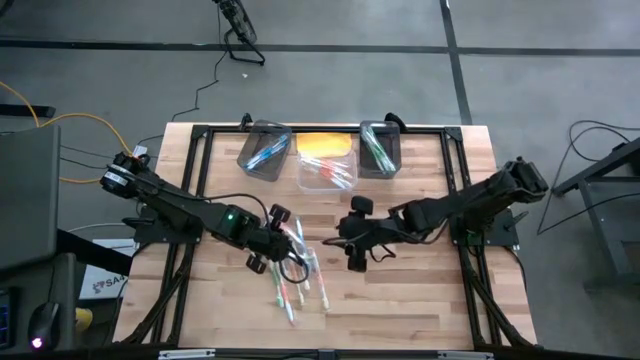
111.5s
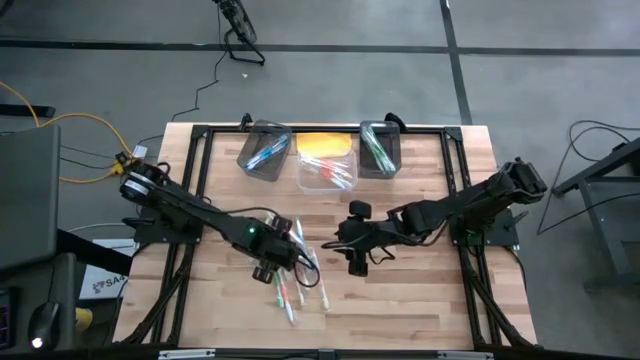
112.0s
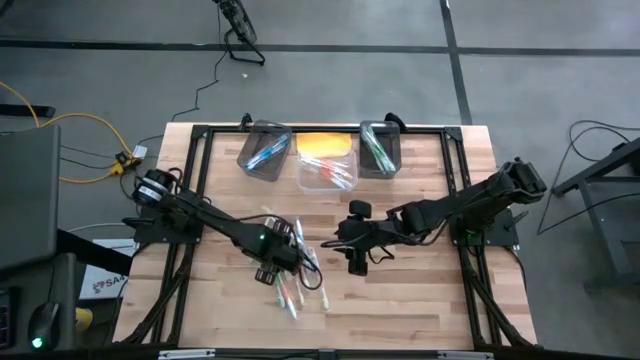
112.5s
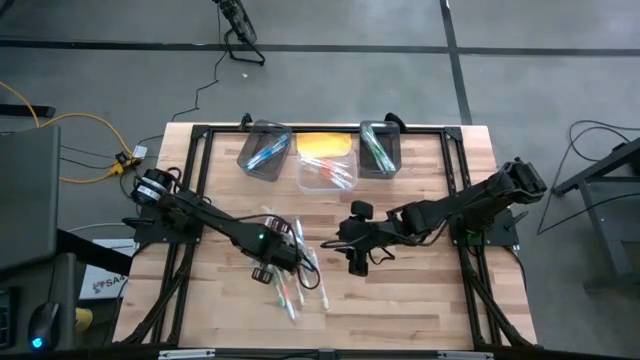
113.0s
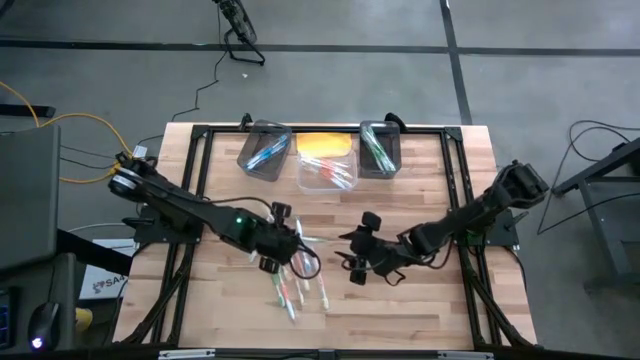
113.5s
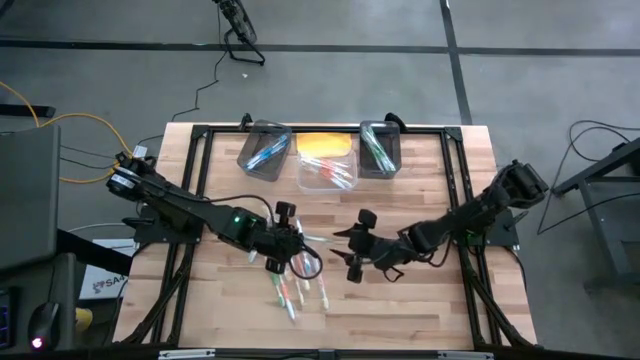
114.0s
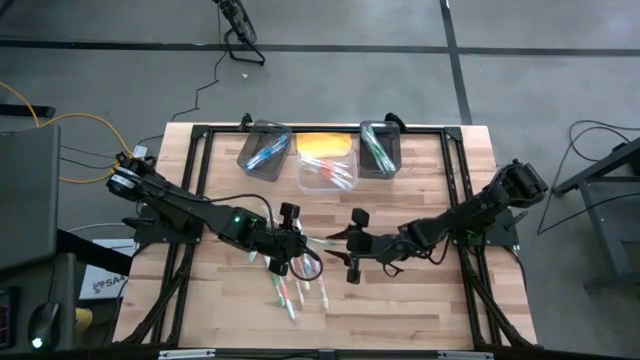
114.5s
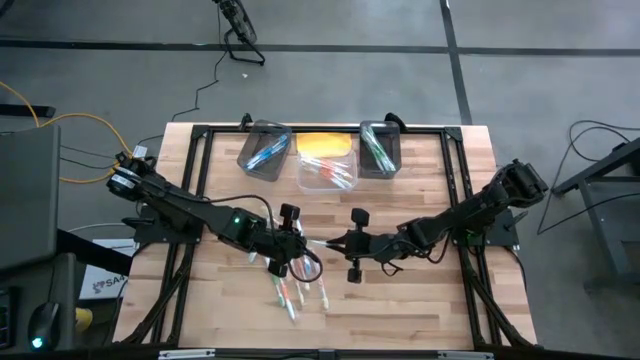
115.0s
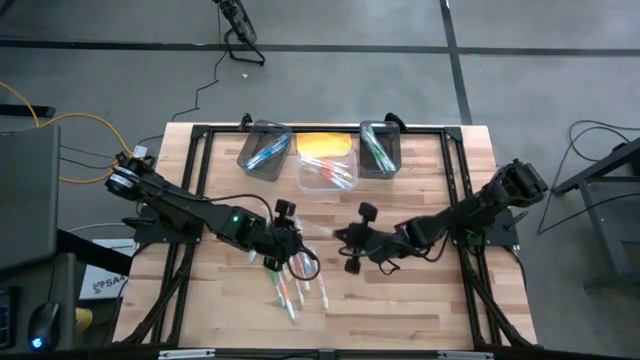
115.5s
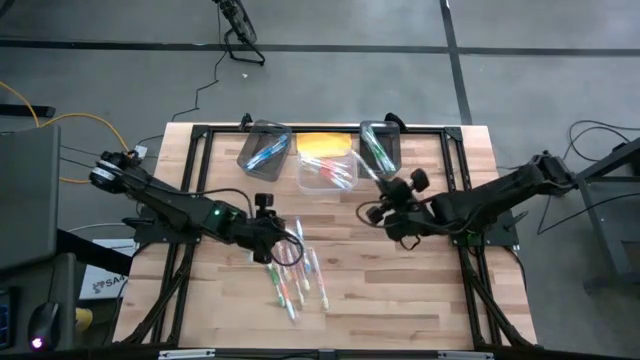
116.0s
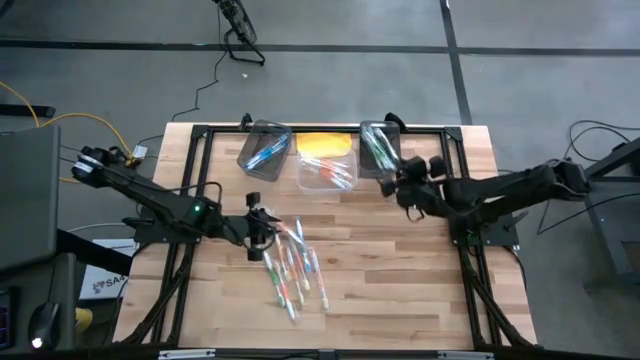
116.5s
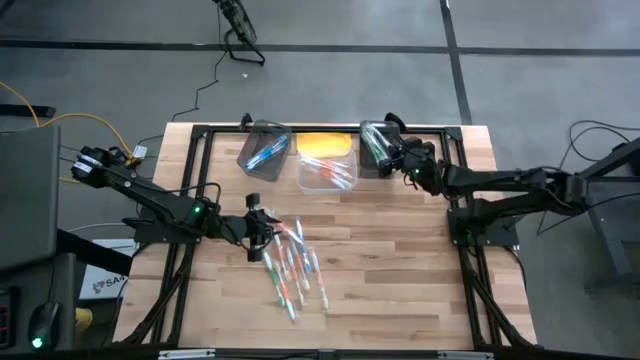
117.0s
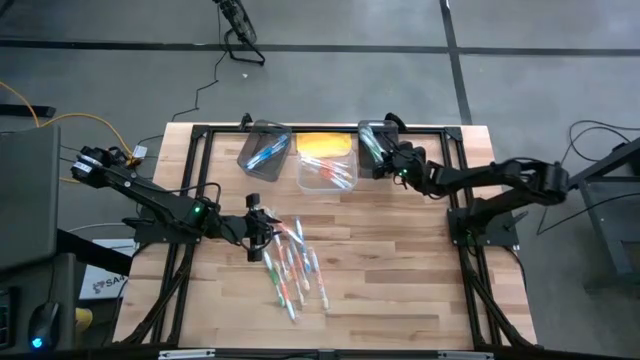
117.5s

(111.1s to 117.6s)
Task: Pick & Place Toothbrushes
Put the green toothbrush into the right black bin

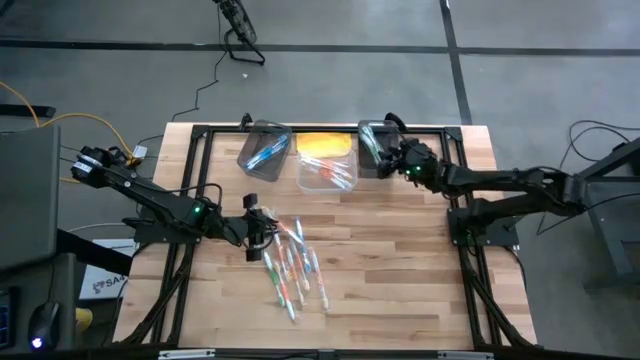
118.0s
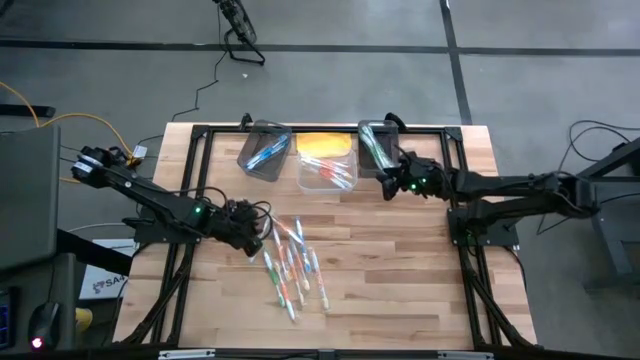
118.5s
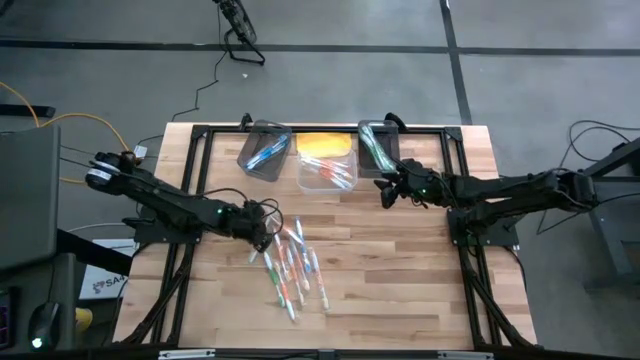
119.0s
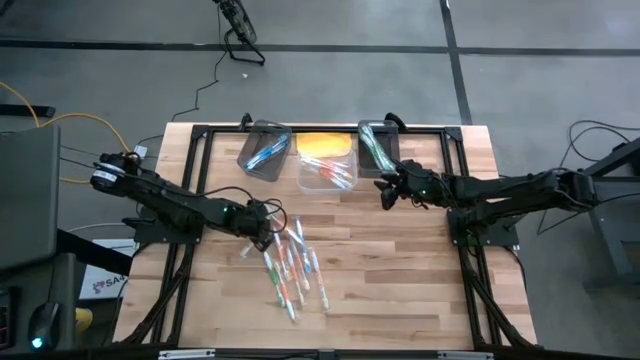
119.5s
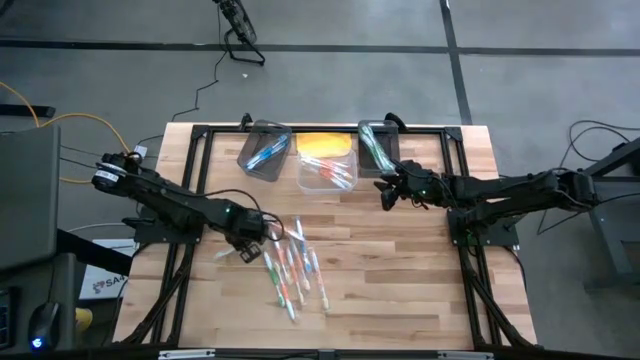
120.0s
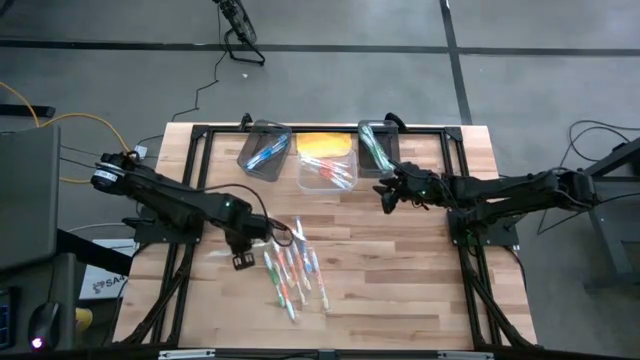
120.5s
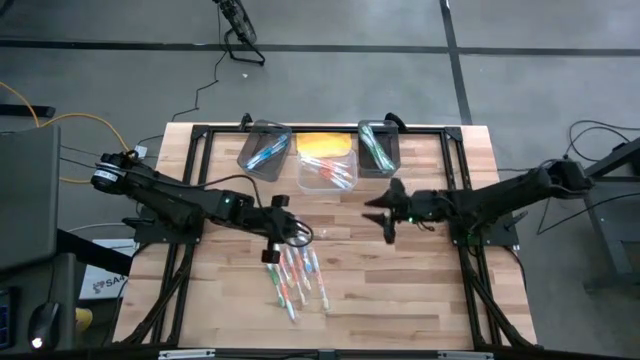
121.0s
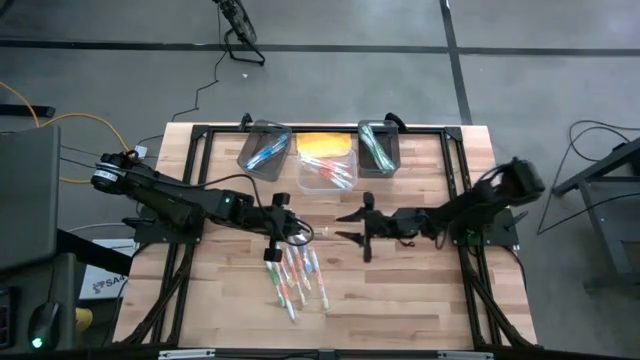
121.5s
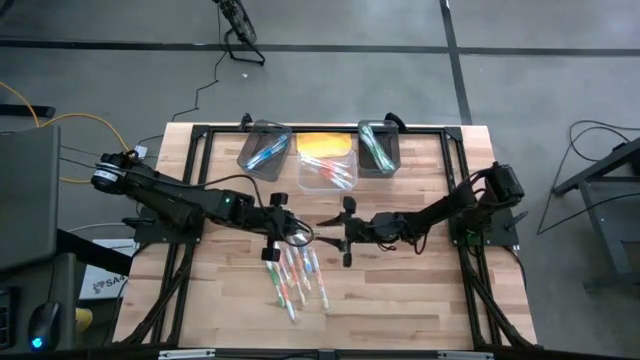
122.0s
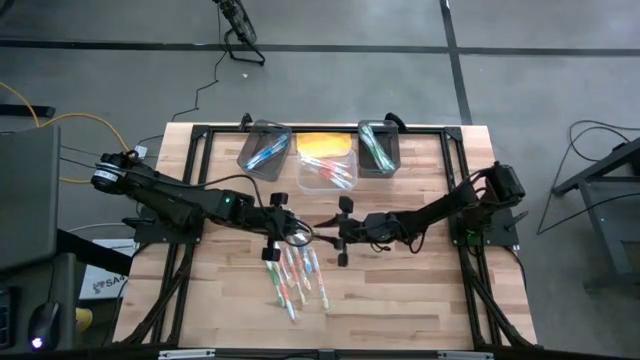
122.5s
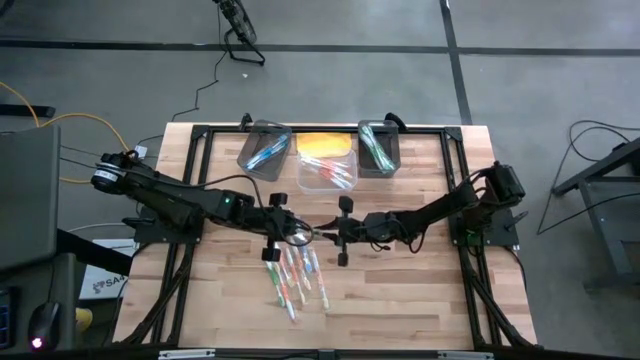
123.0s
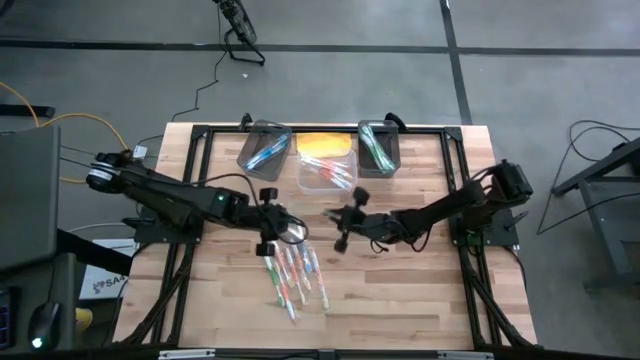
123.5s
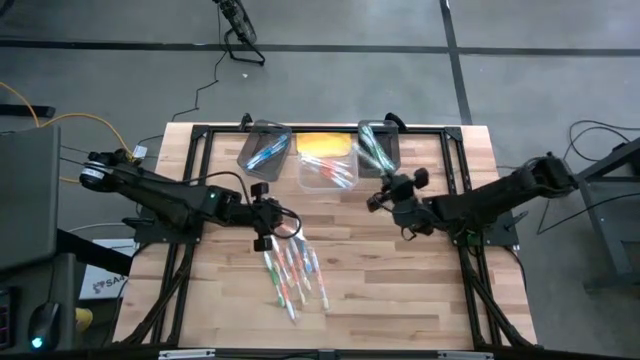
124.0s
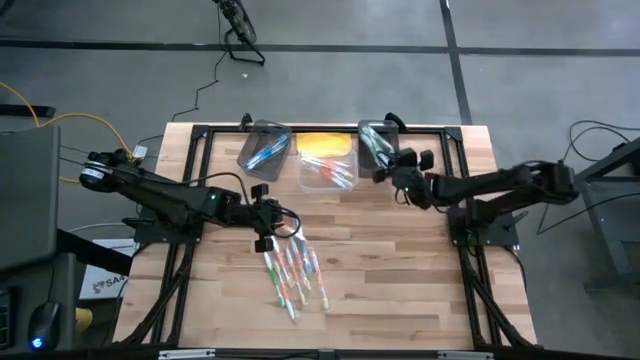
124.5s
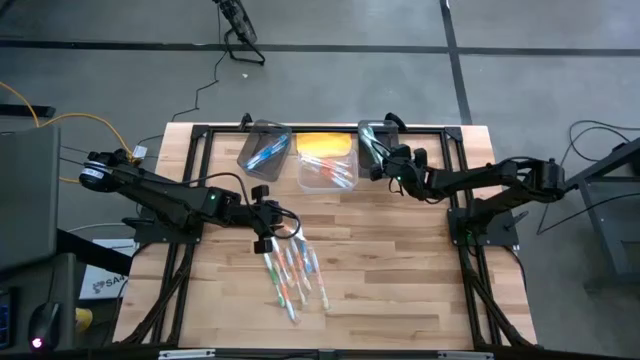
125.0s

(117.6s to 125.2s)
Put the green toothbrush into the right black bin

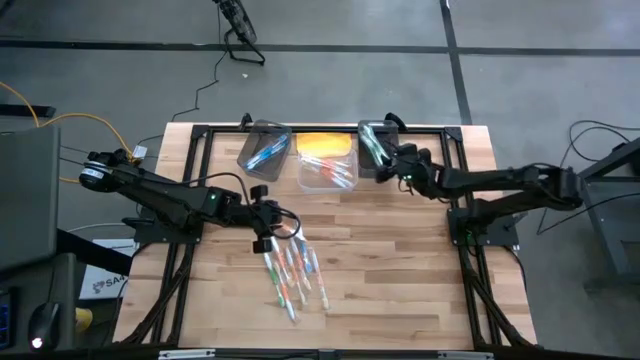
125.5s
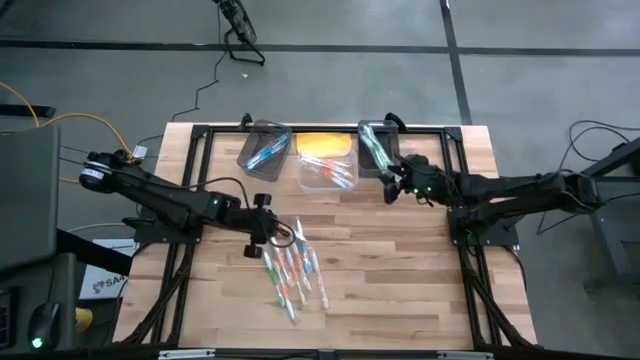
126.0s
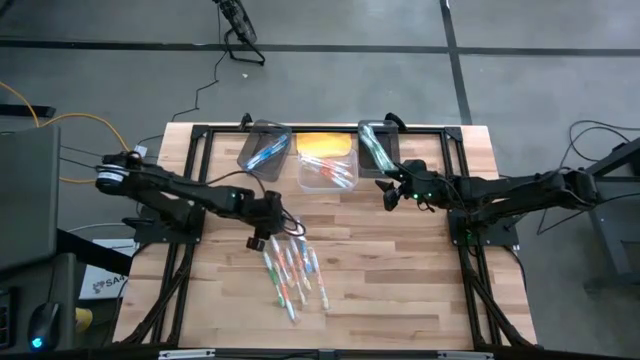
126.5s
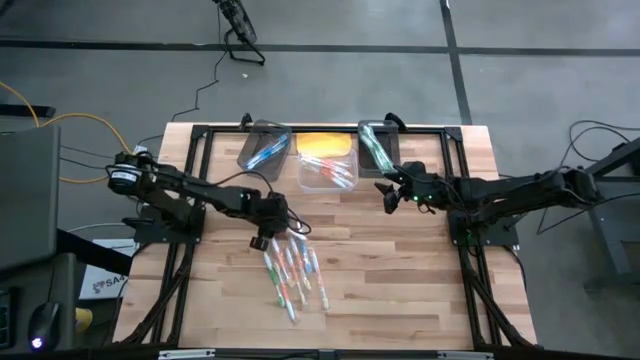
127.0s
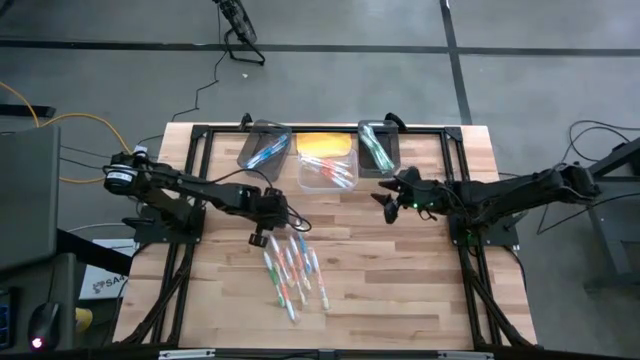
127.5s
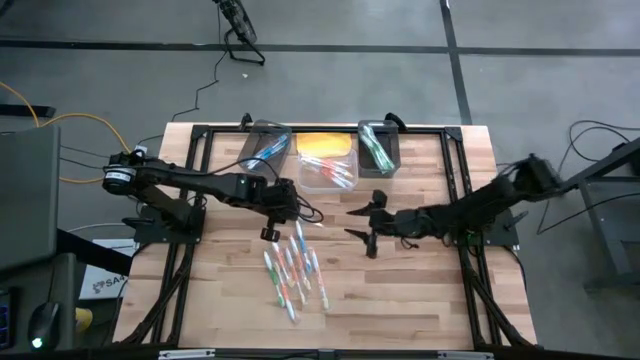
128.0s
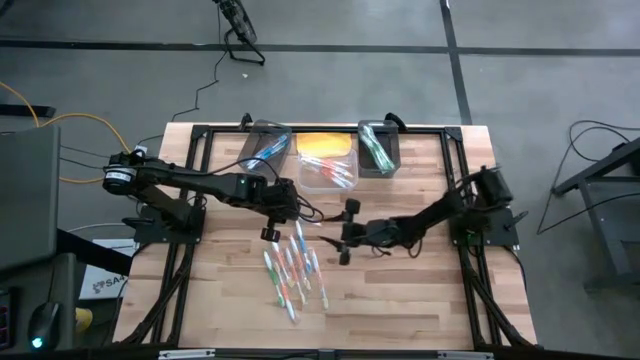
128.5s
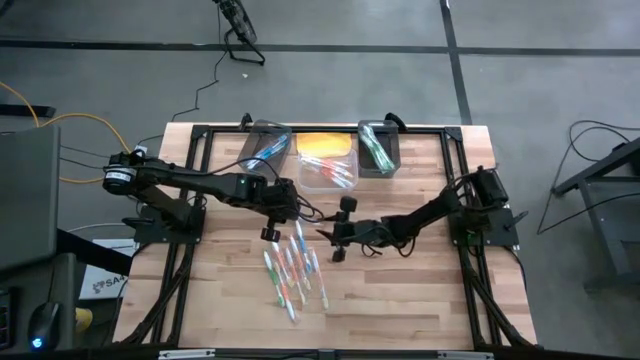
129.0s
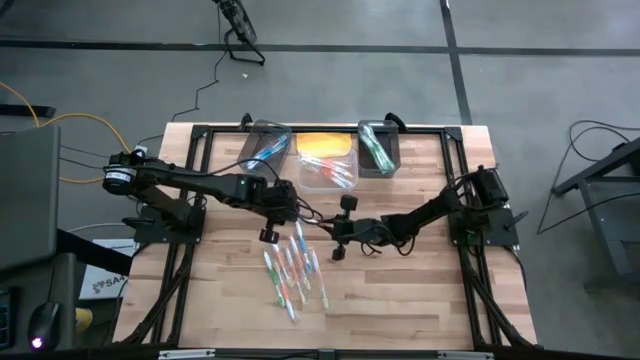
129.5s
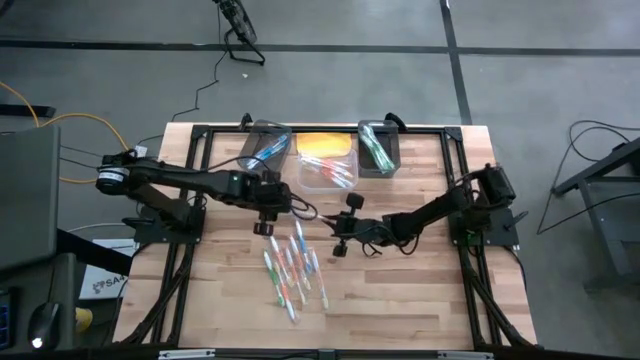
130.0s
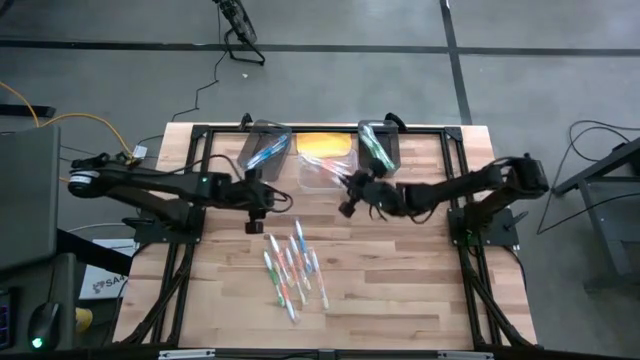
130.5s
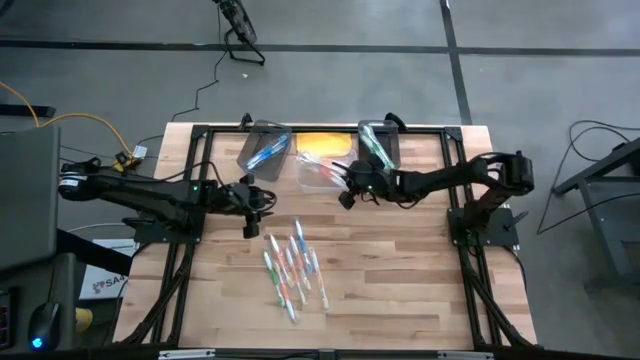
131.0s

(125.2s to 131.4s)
Put the orange toothbrush into the transparent bin

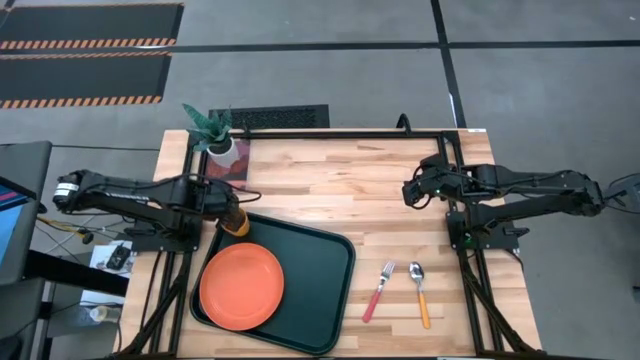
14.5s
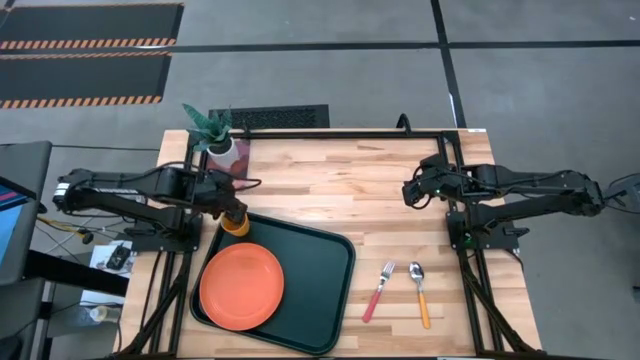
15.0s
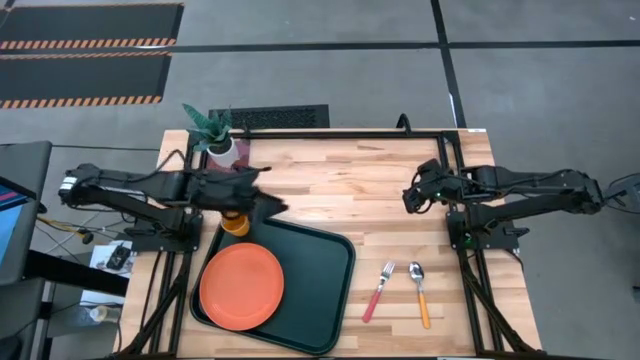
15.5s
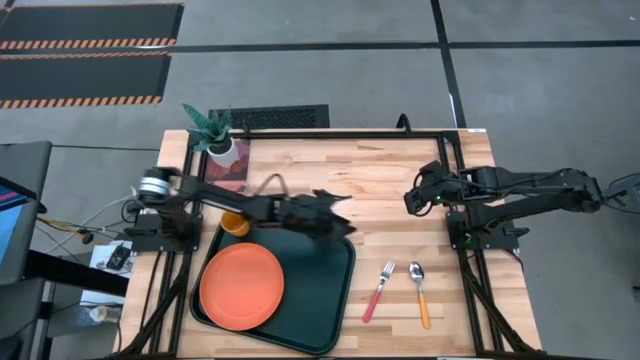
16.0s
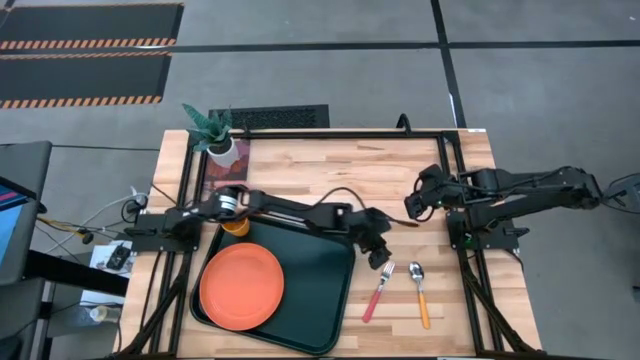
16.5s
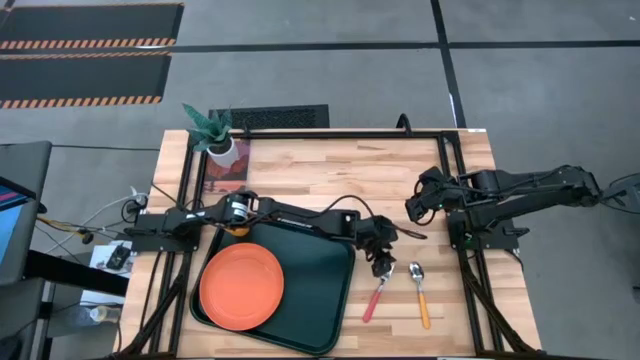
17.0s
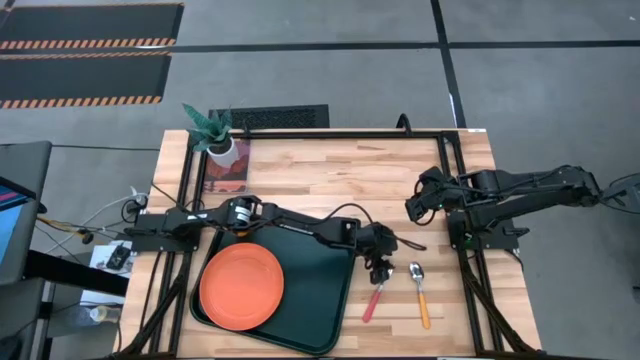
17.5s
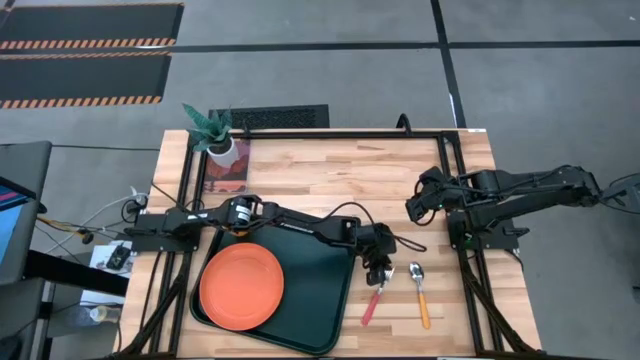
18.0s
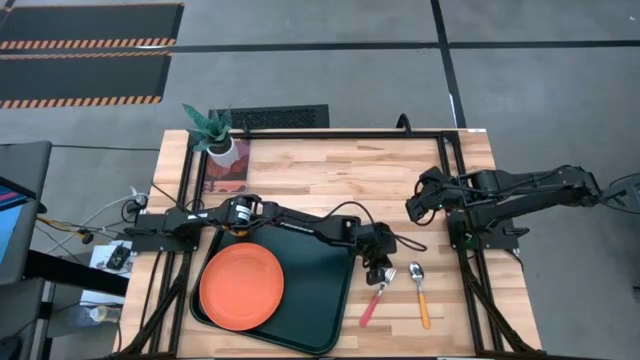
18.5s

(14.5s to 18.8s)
Task: Pick and place plate/cup/fork/spoon on tray
Put the pink fork on the right of the black tray
